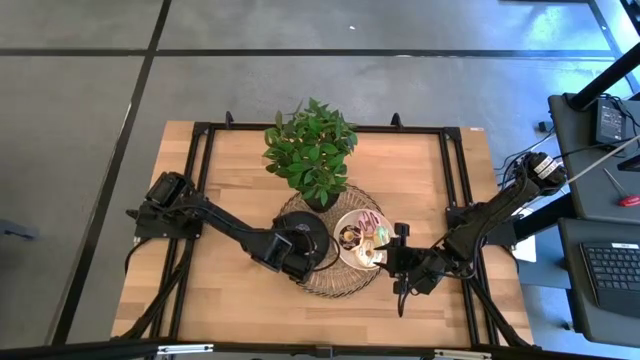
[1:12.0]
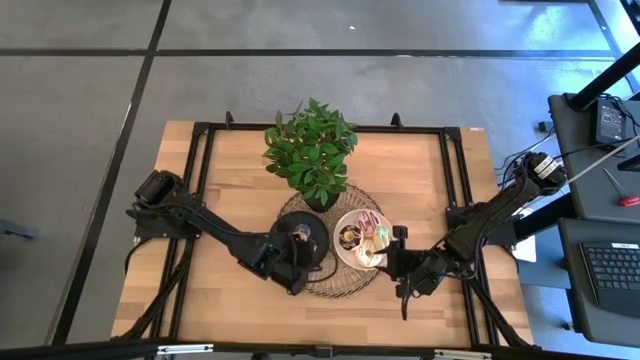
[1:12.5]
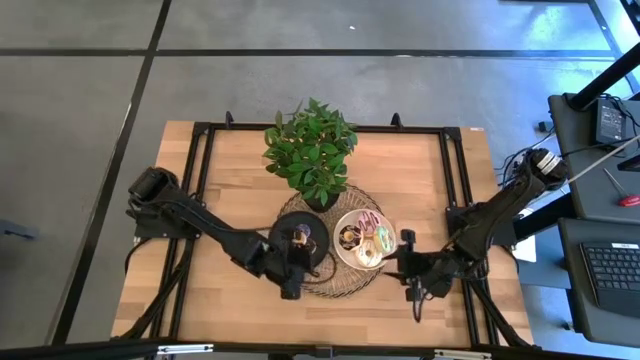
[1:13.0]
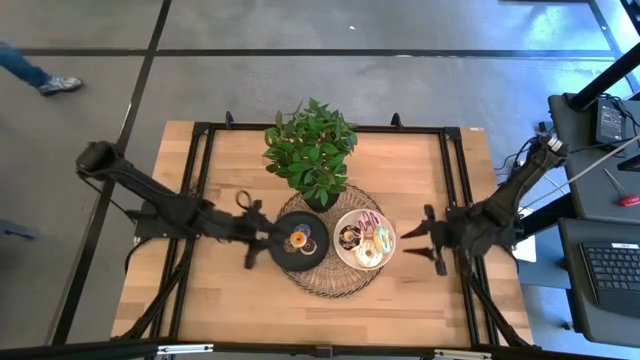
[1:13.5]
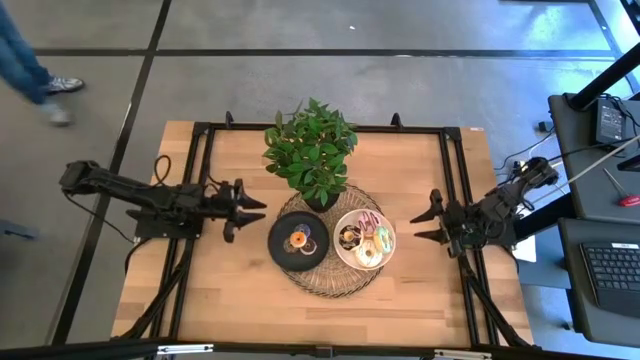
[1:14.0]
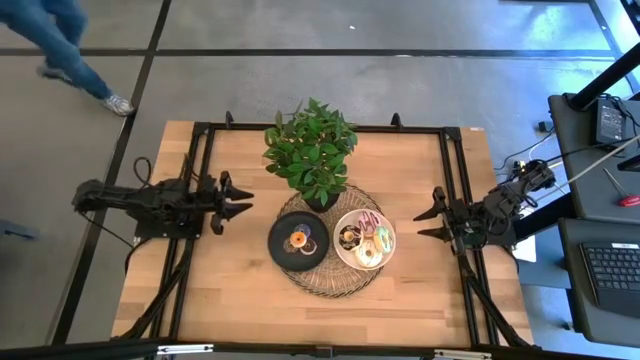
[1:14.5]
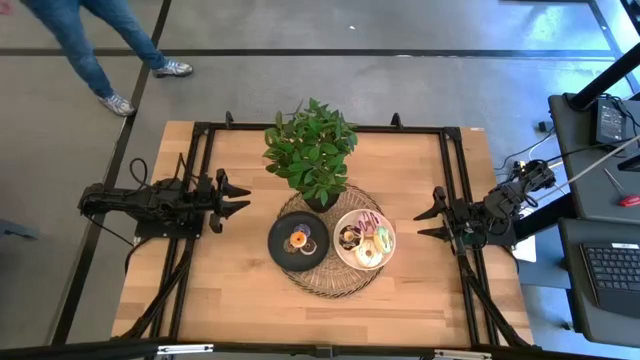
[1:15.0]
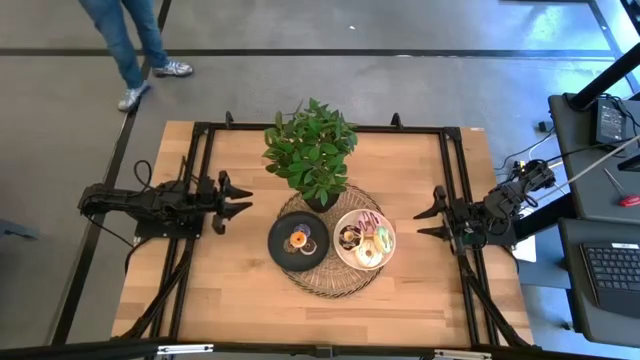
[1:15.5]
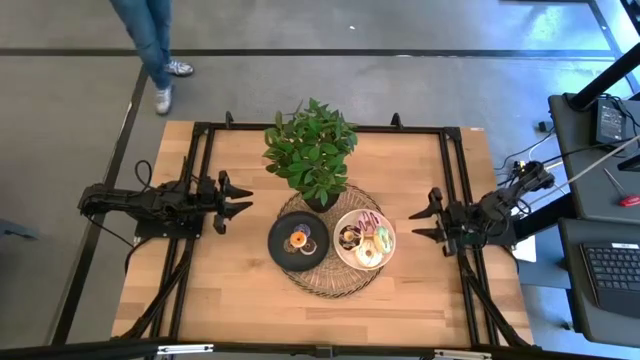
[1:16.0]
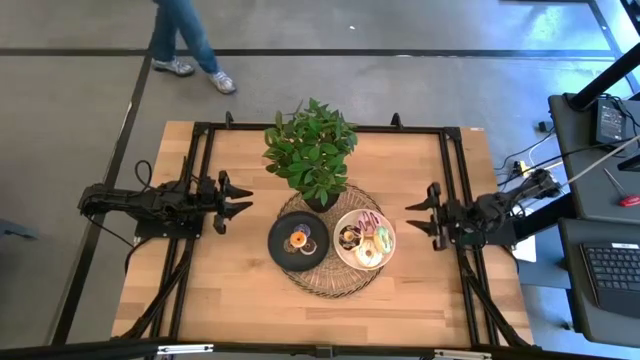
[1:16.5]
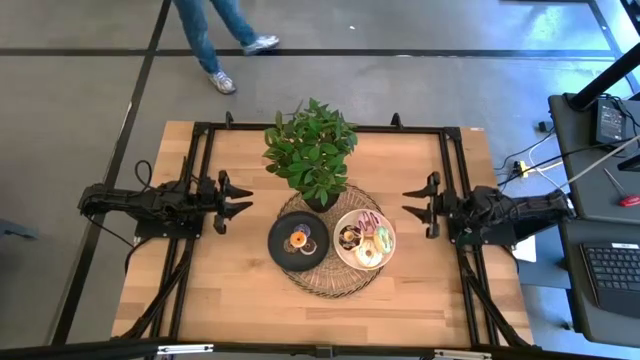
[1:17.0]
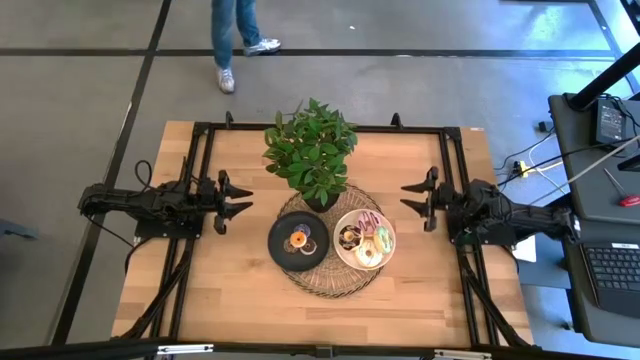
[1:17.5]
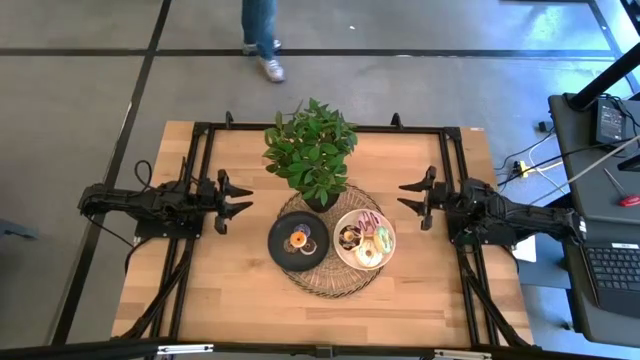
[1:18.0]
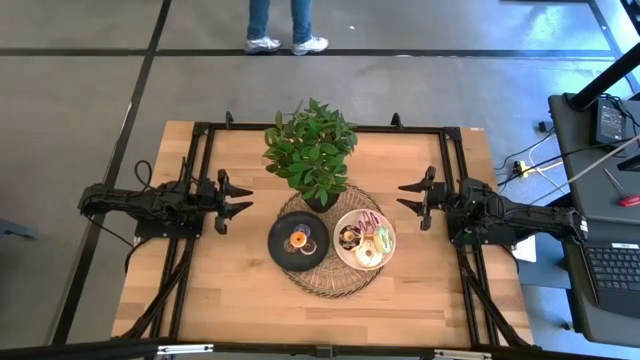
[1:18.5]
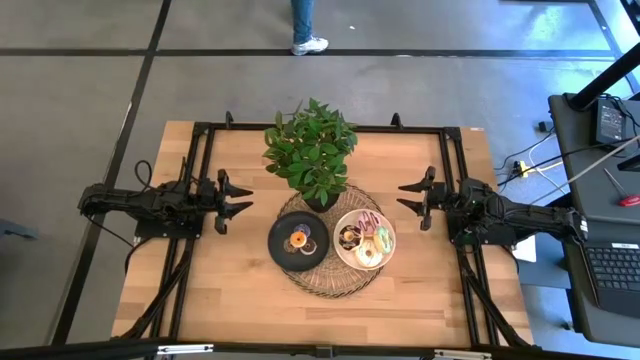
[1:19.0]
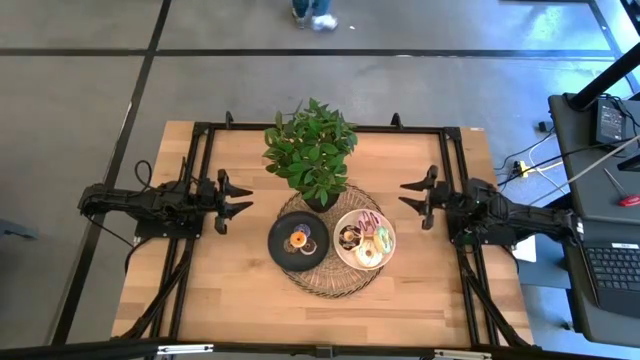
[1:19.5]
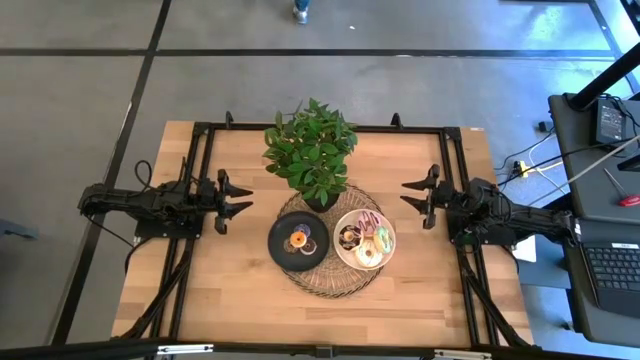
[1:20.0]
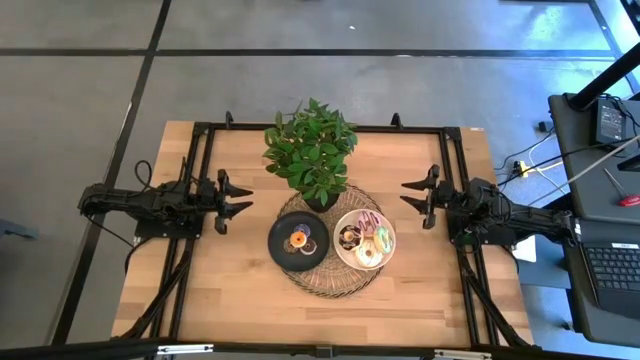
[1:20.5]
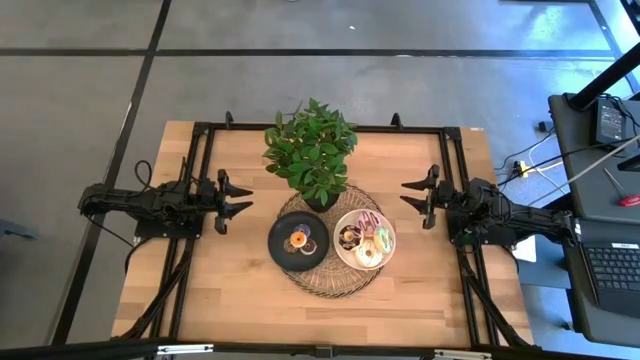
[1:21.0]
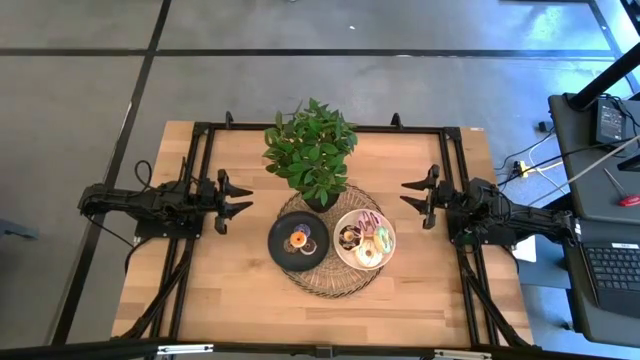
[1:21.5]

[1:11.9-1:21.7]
Task: Pick & Place donuts
Return to Home Position

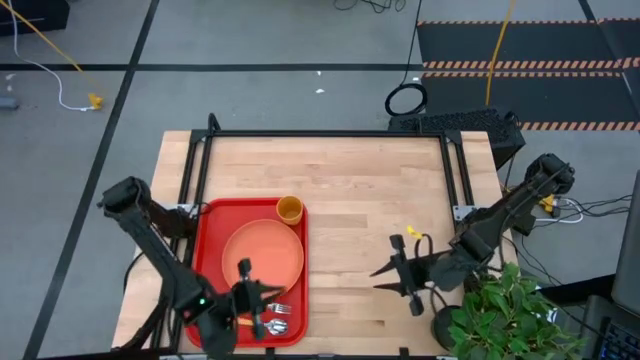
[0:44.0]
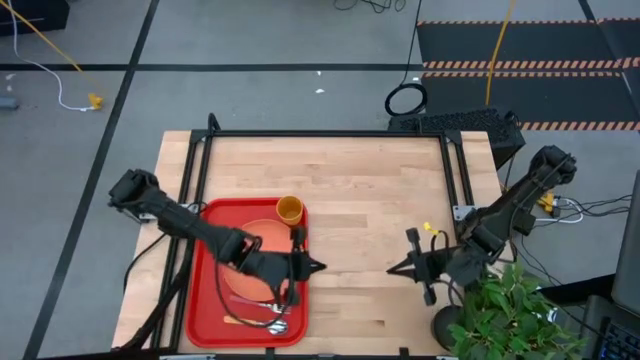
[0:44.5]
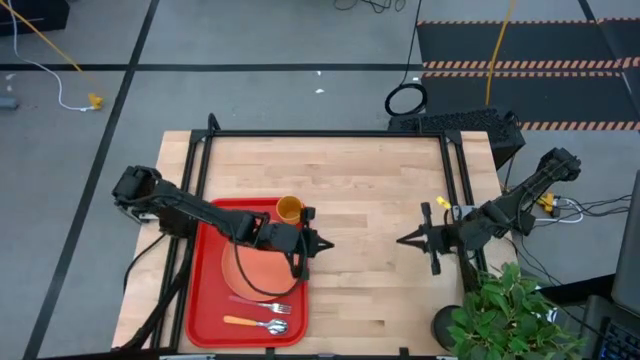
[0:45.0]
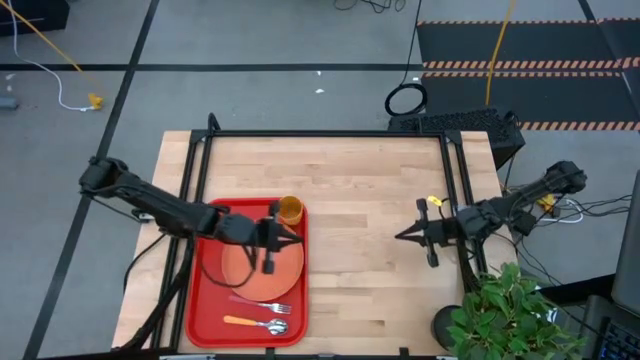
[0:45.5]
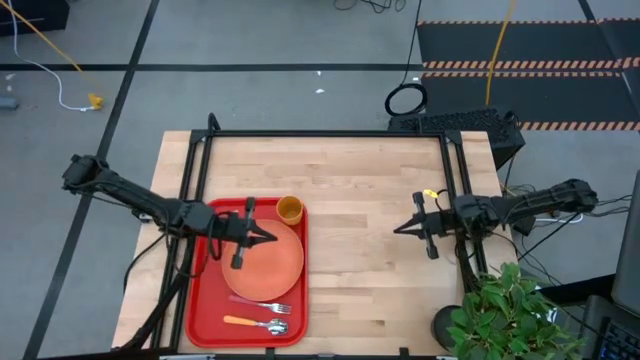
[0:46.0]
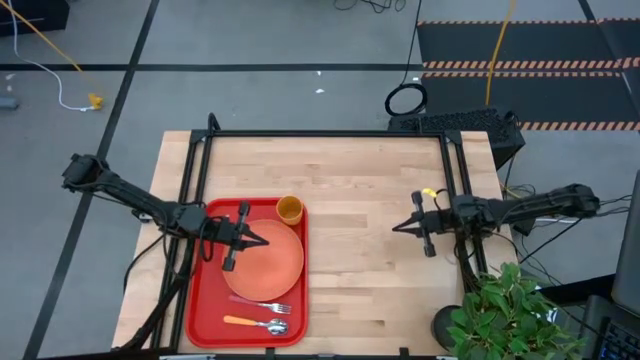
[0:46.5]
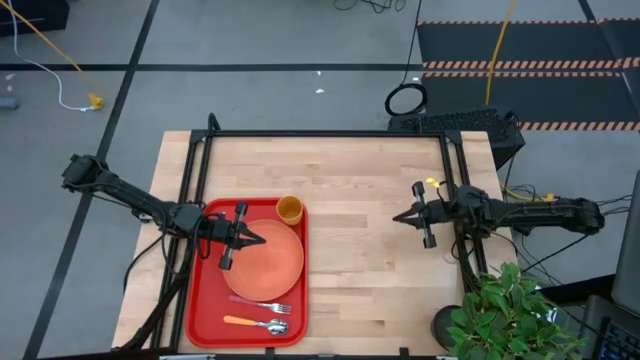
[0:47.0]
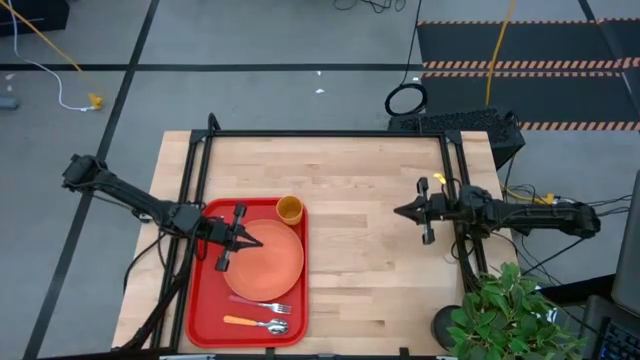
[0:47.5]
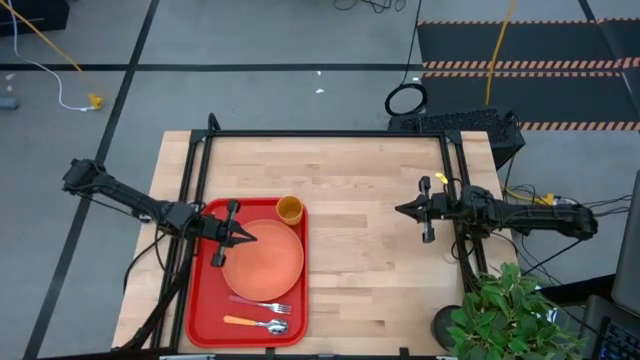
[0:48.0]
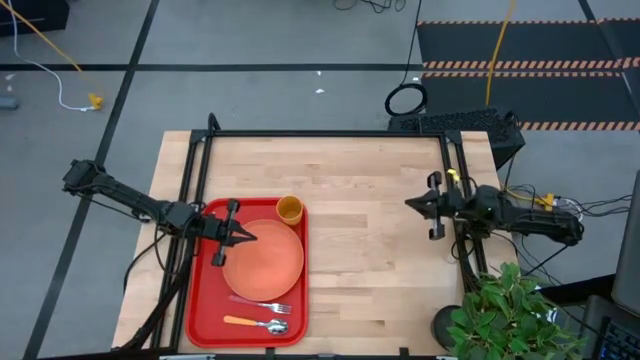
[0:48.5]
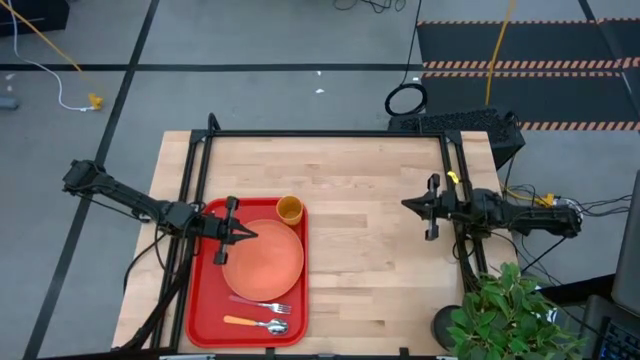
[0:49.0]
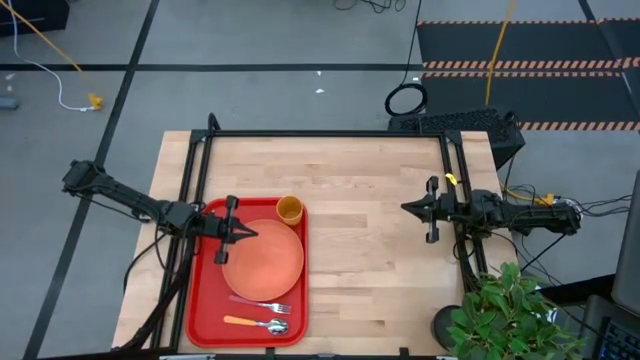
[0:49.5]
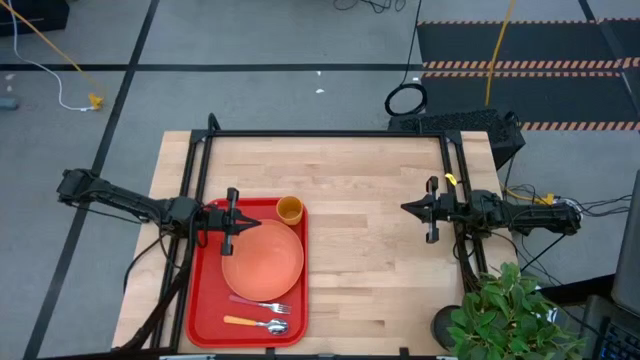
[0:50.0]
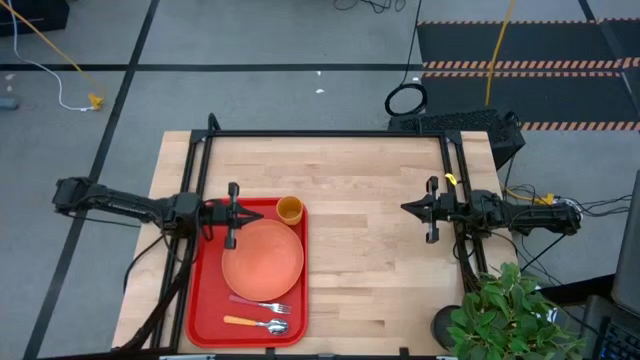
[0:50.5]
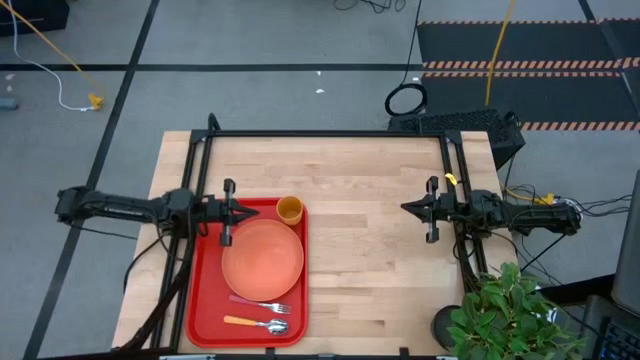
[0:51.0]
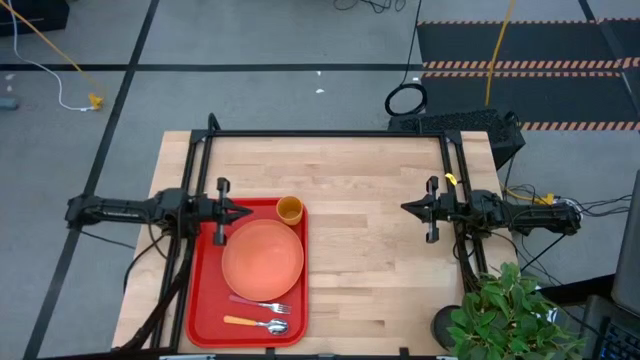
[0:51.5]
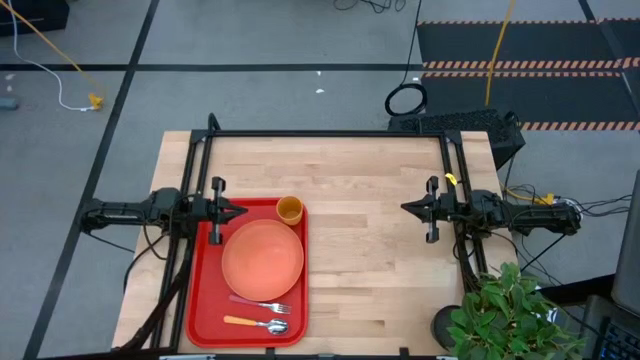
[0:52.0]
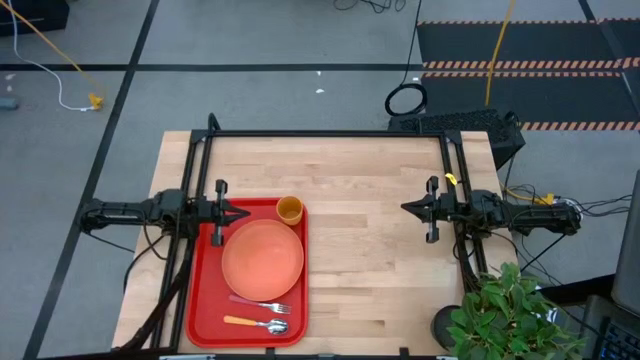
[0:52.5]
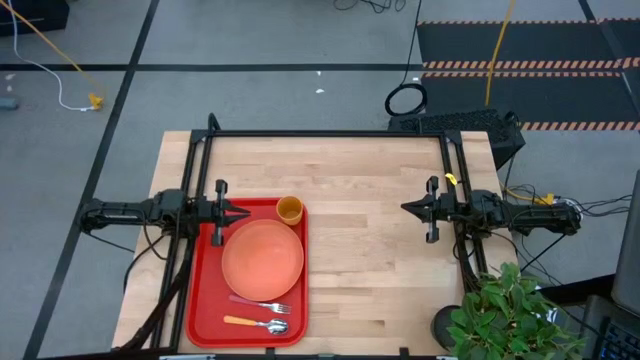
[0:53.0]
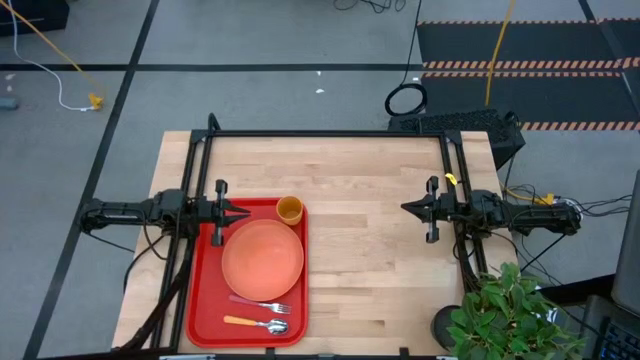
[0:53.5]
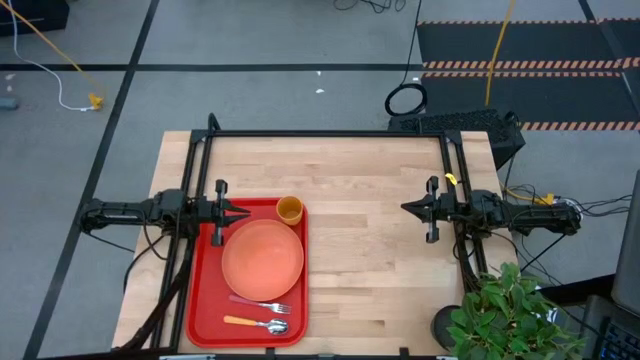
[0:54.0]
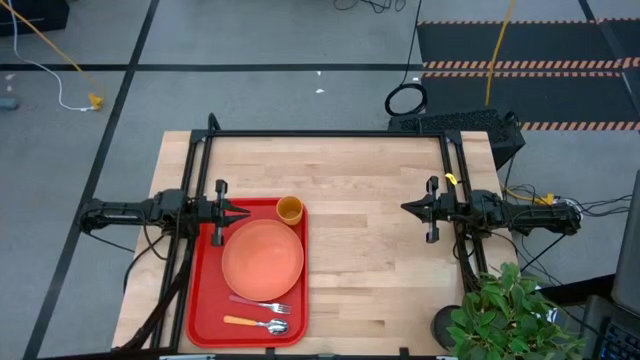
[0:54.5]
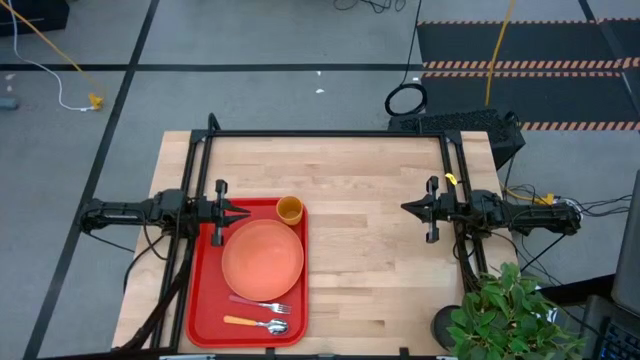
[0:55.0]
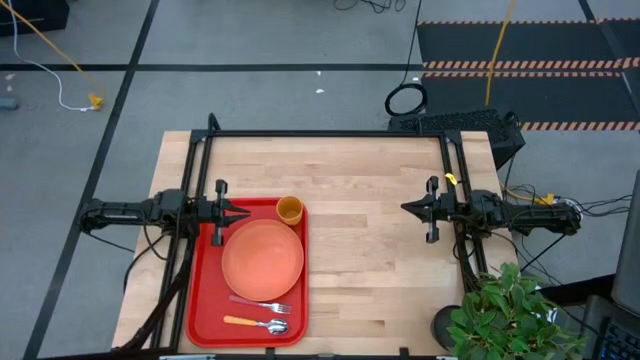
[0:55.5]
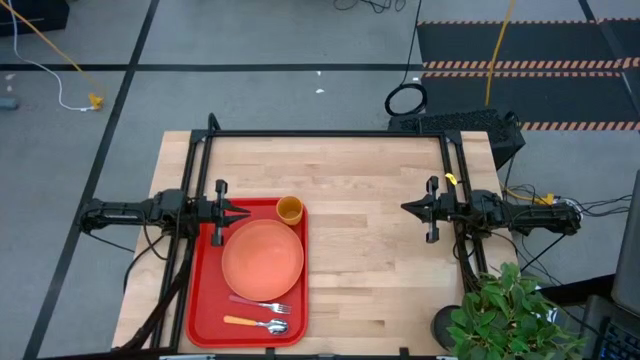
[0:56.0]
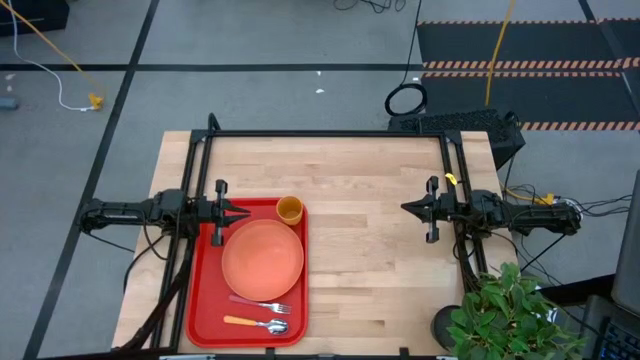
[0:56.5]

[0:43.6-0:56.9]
Task: Pick and place plate/cup/fork/spoon on tray
Return to Home Position
